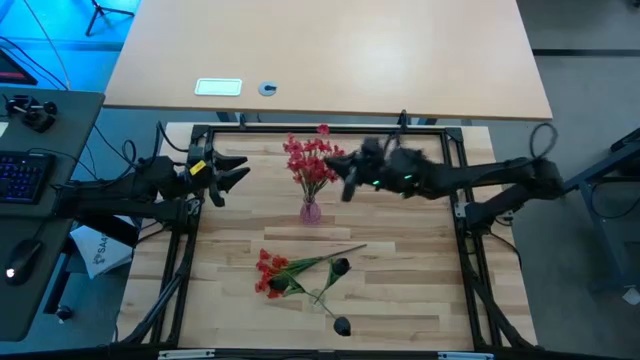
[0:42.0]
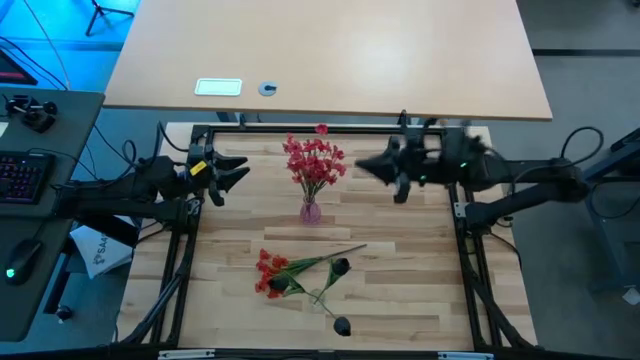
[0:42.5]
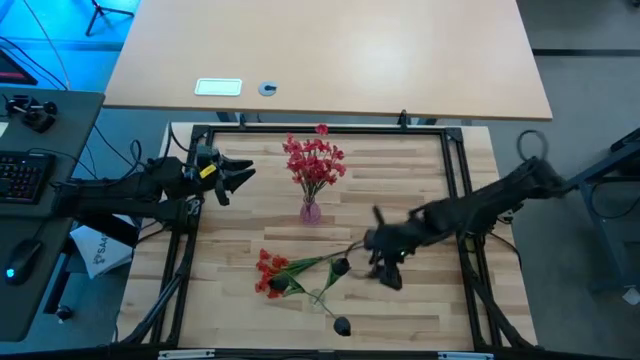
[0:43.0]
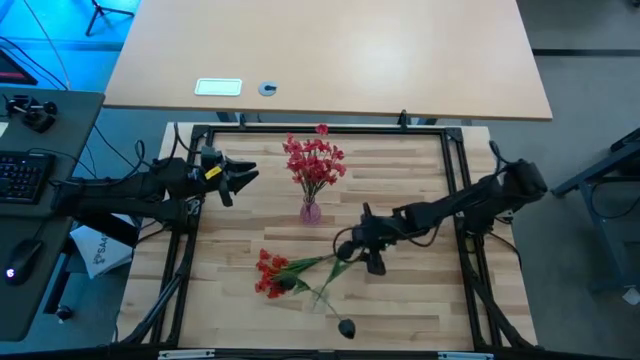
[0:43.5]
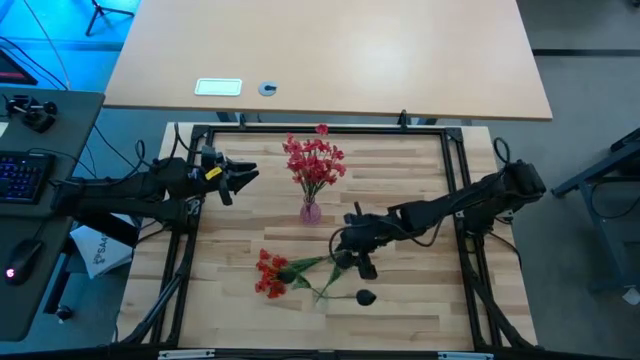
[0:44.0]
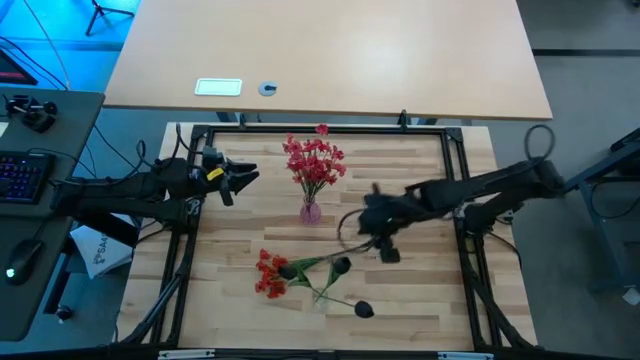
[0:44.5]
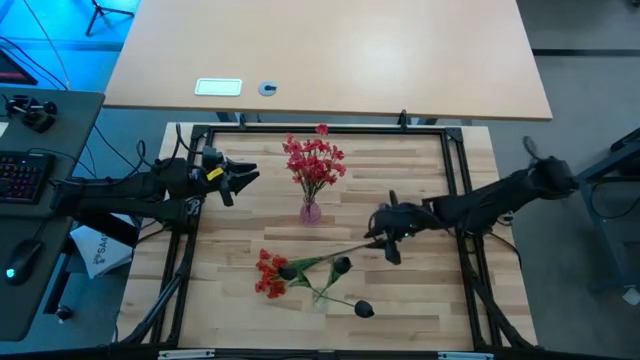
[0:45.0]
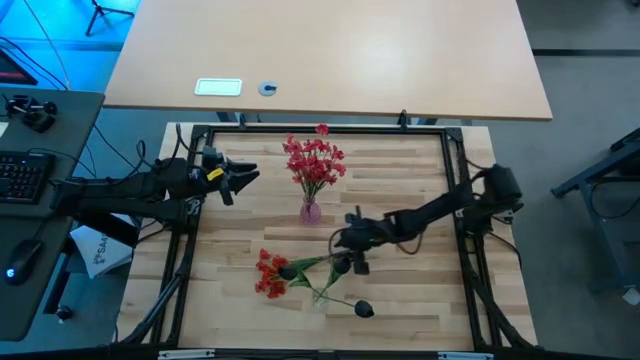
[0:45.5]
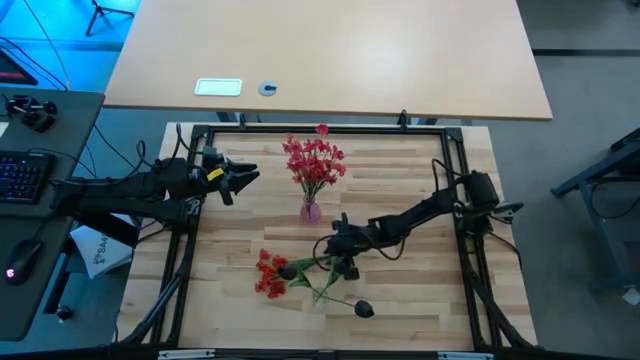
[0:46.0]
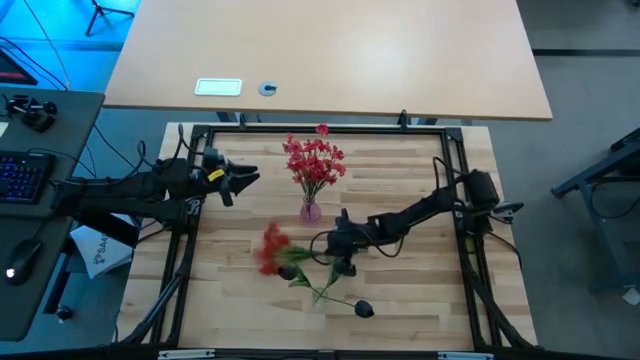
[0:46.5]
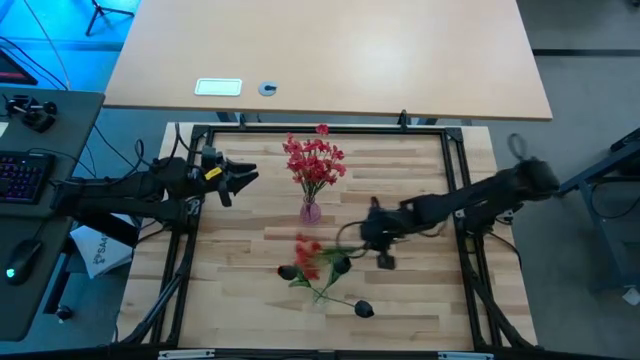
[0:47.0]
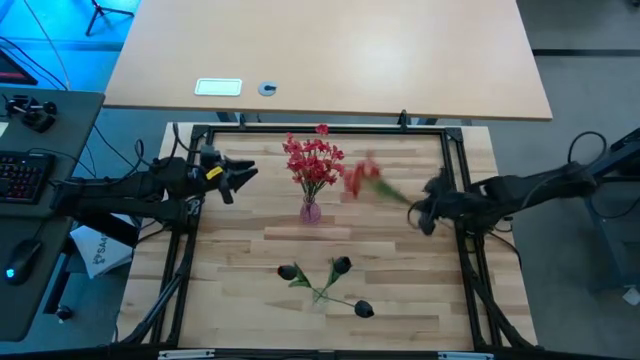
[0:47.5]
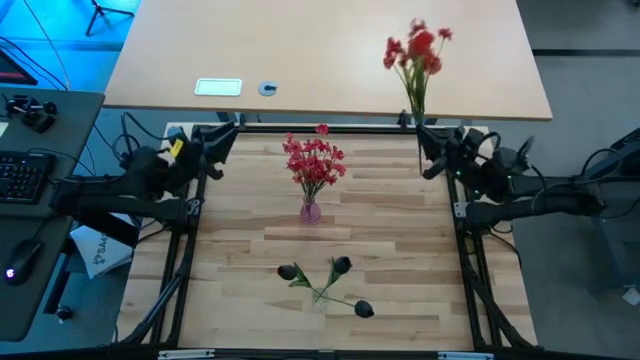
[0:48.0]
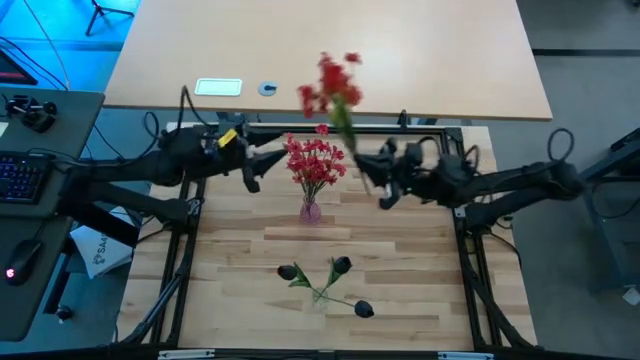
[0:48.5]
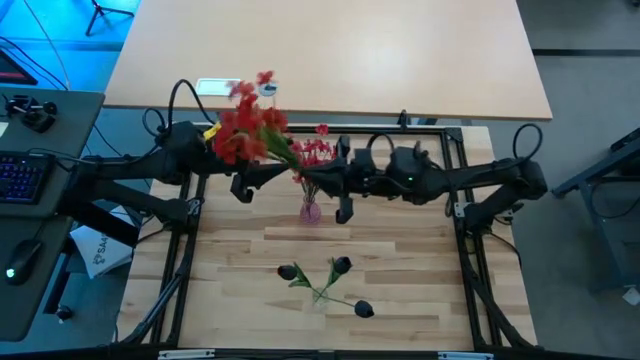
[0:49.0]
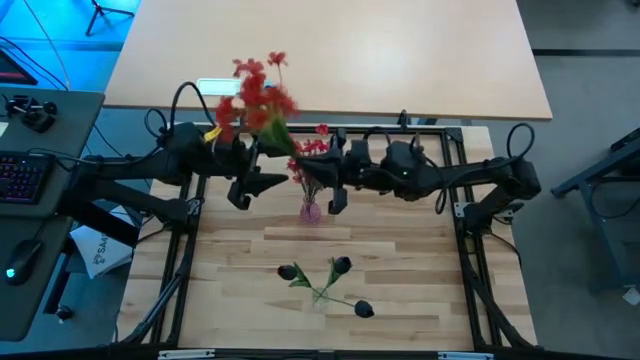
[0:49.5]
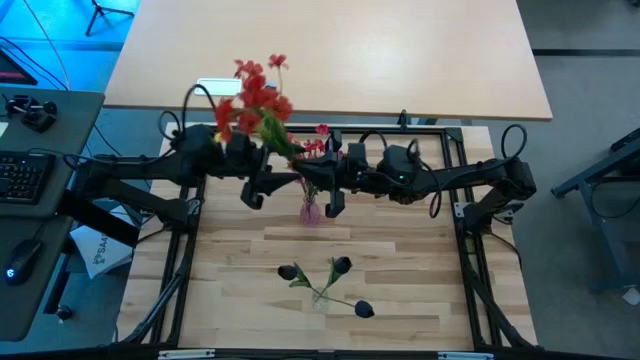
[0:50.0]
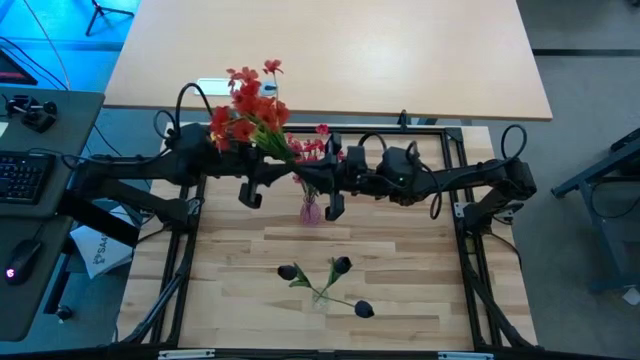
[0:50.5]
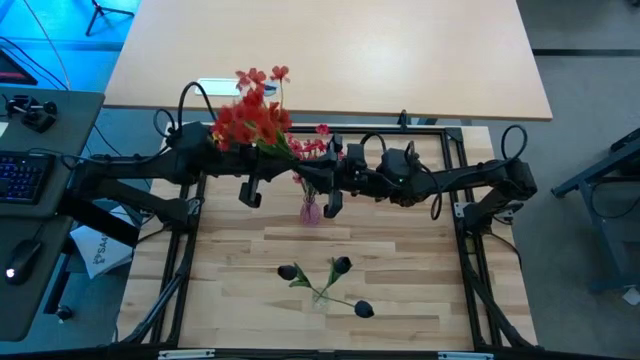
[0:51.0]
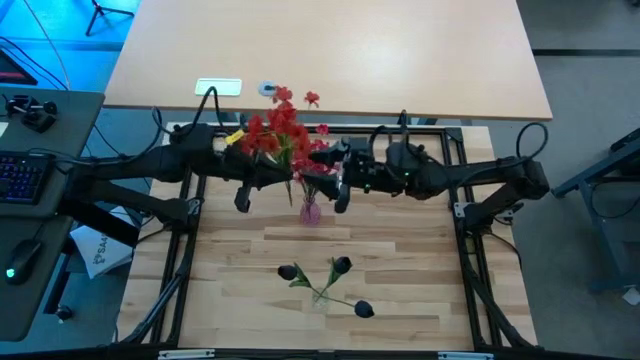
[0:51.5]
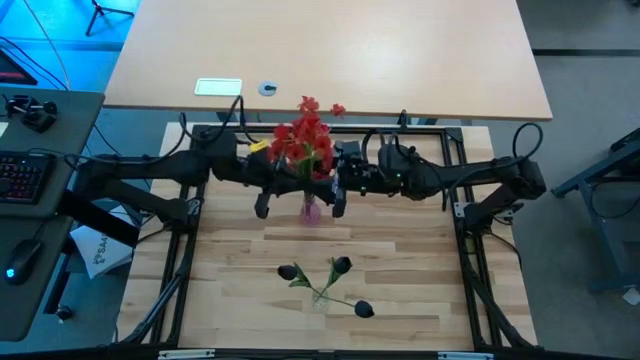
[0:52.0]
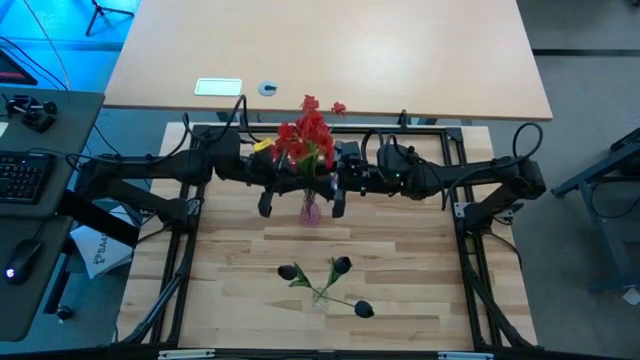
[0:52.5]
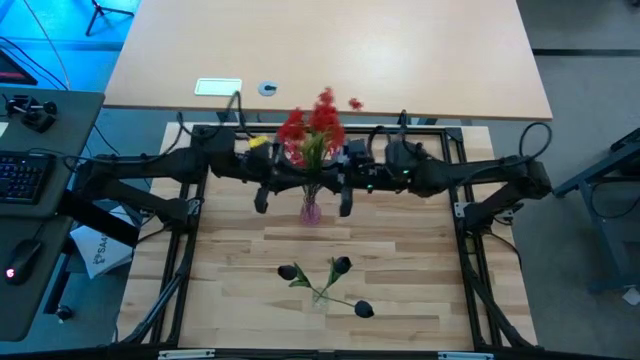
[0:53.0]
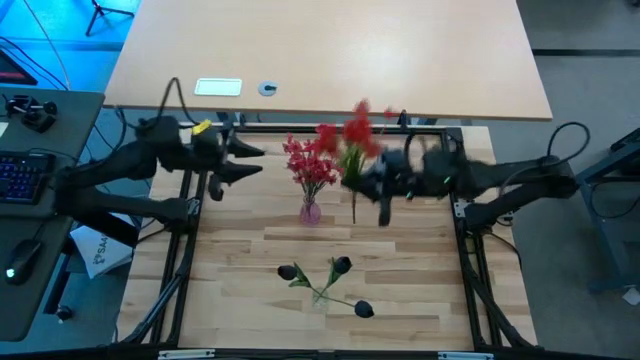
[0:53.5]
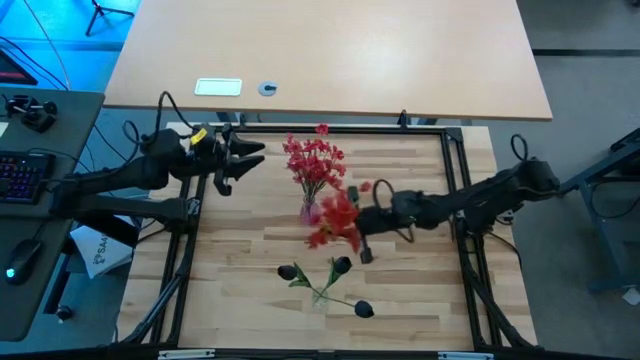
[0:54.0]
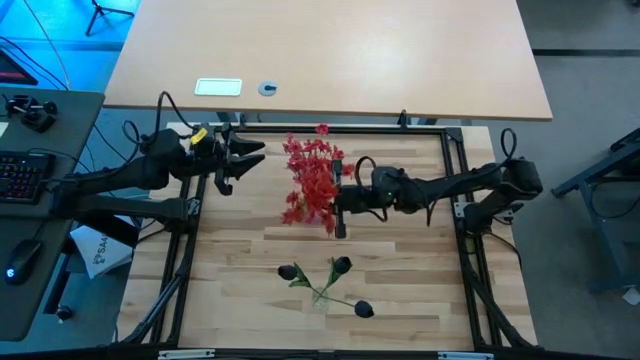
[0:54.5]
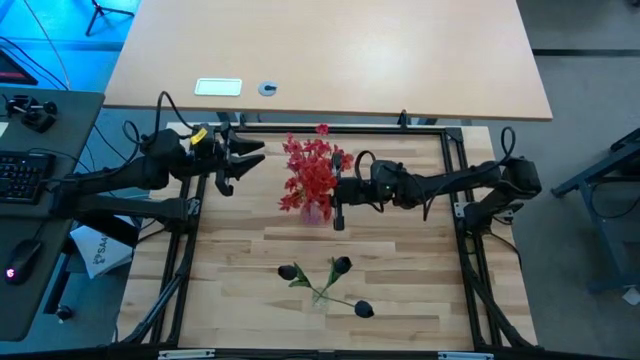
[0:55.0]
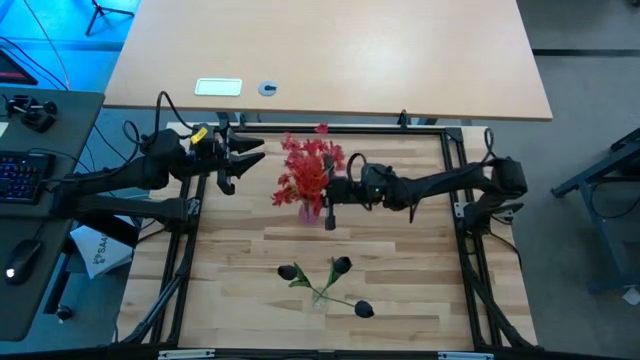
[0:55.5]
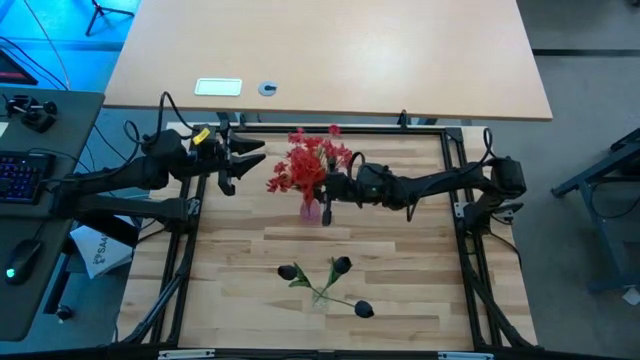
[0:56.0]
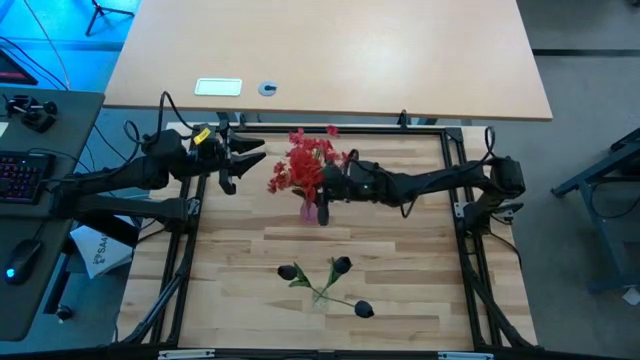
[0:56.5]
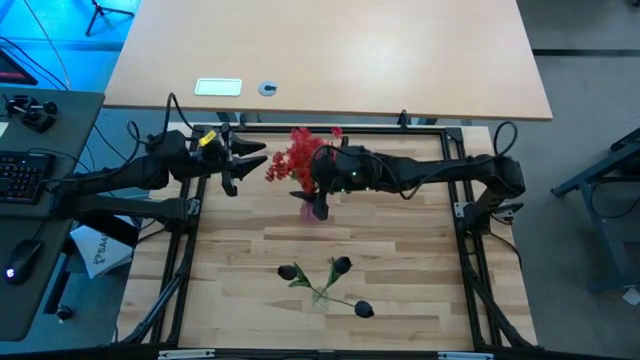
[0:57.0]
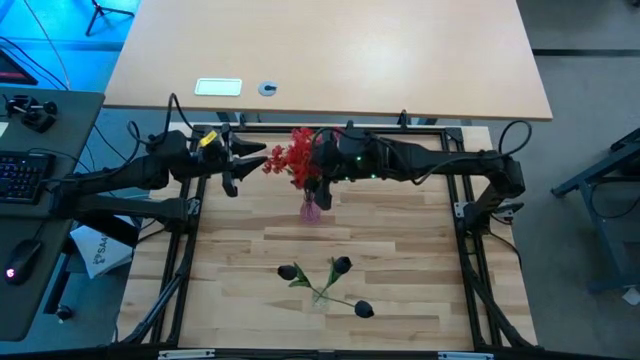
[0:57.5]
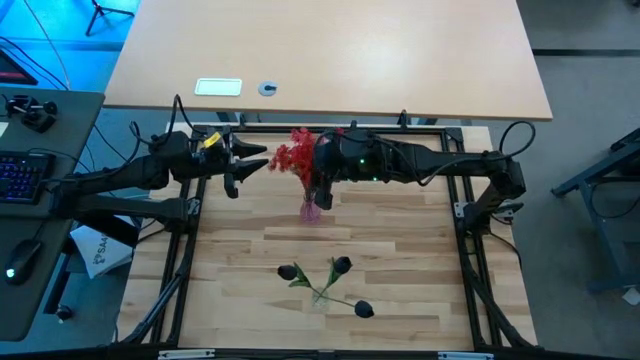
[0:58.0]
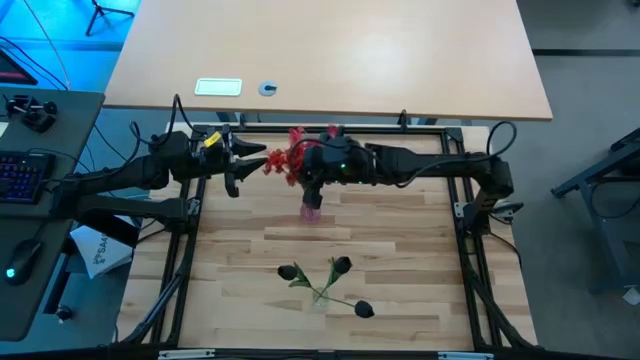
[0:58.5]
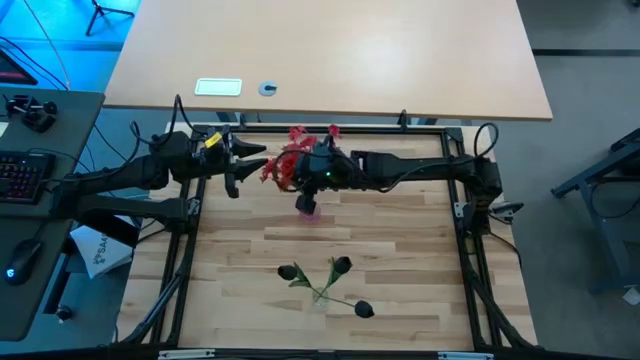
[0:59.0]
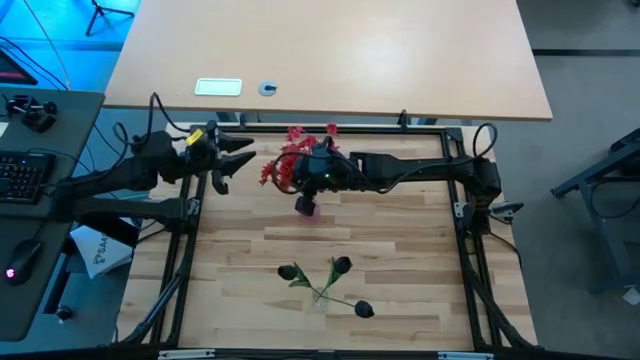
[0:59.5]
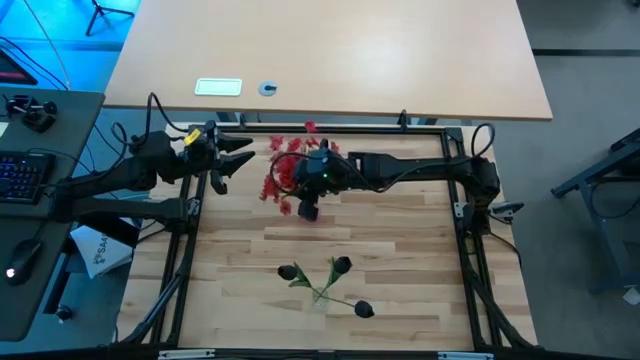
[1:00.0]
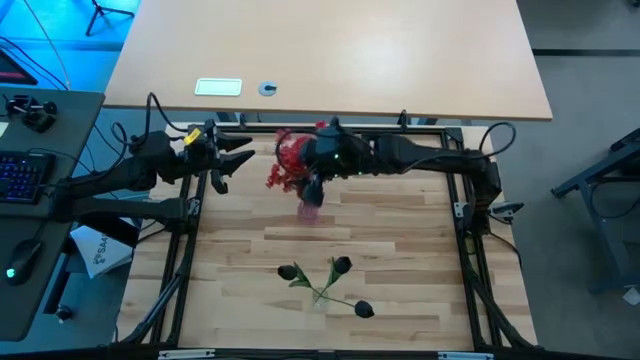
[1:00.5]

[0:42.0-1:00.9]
Task: Sort flowers into vase by color
Put the red flowers into the pink vase

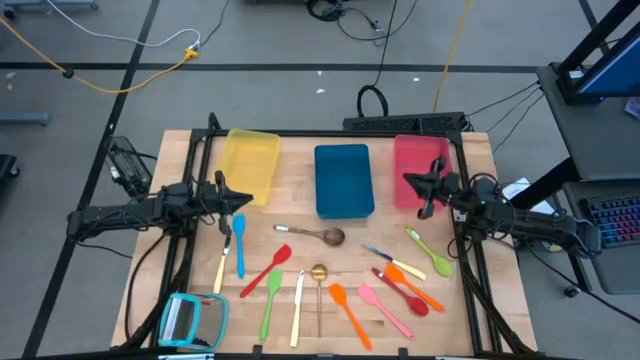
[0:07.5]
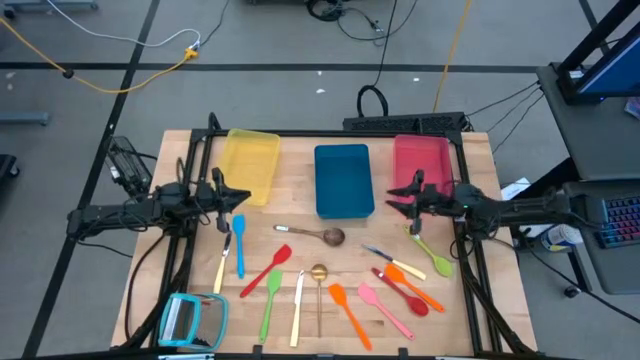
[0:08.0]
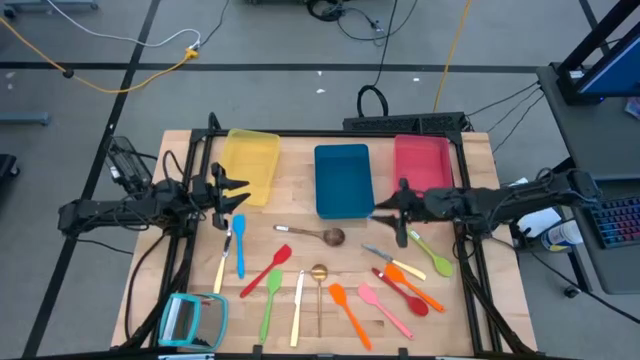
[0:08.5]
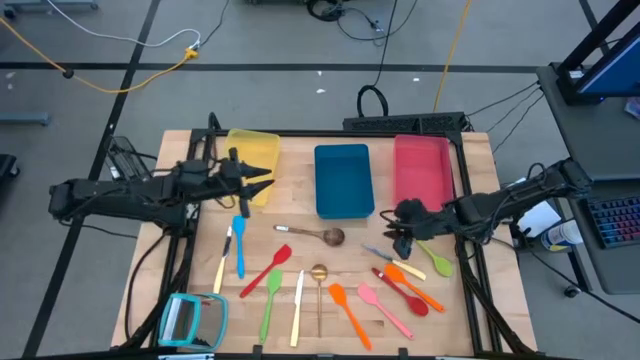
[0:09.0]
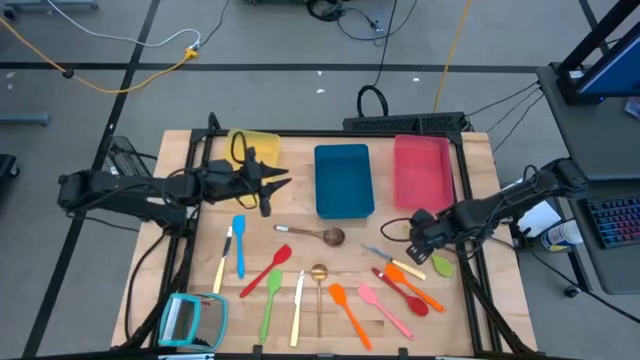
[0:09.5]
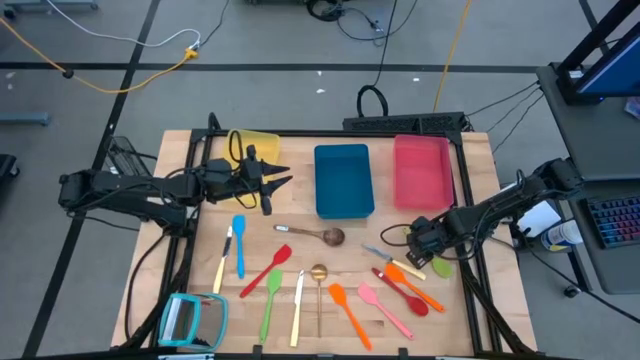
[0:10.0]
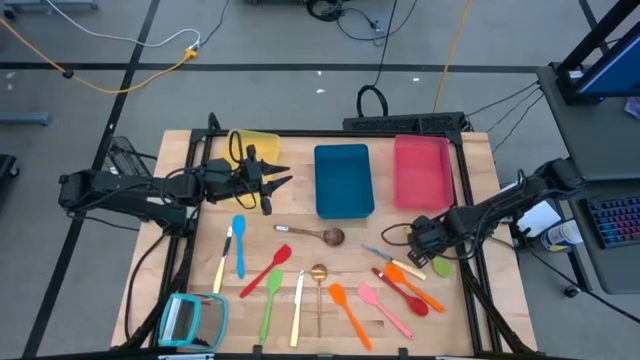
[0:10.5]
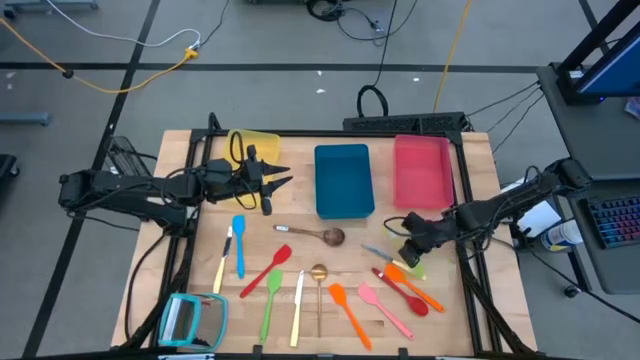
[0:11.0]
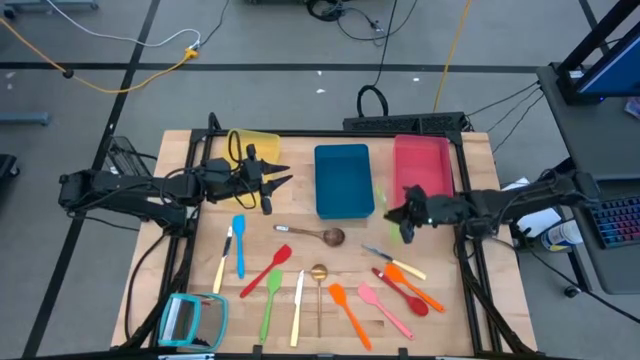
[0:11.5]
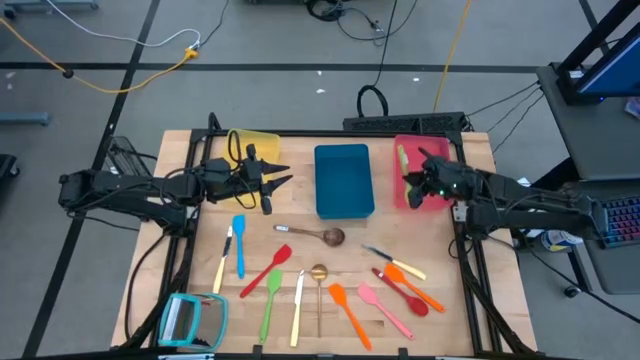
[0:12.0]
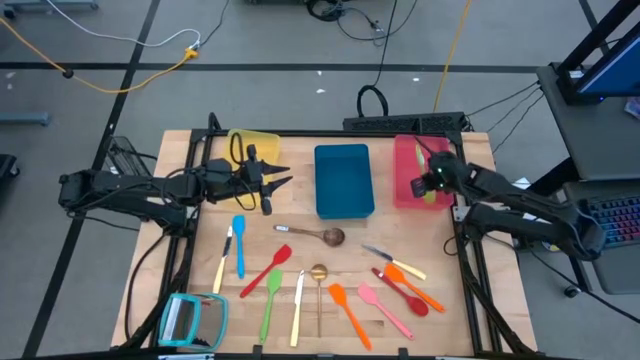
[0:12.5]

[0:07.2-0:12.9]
Task: Pick & Place Kitchen Items
Put the green serving spoon into the red bin
